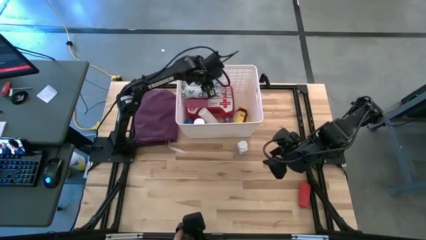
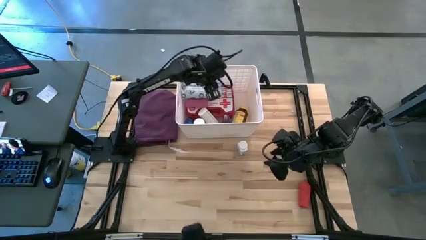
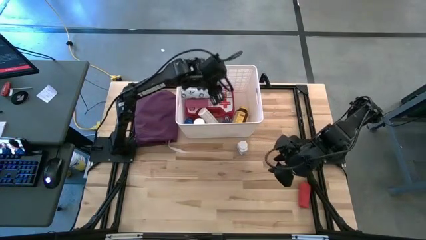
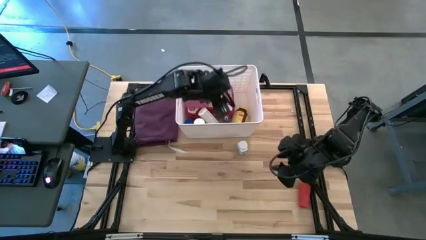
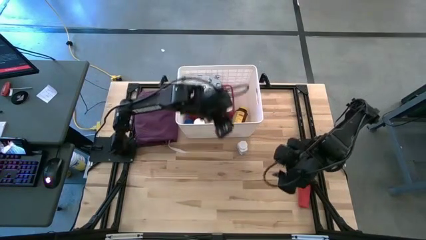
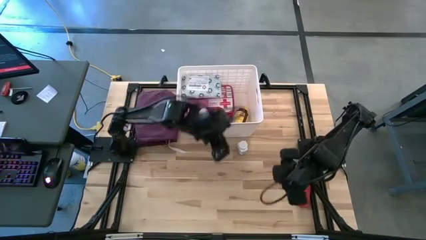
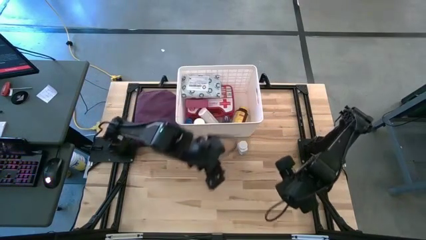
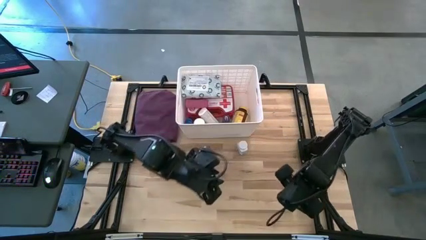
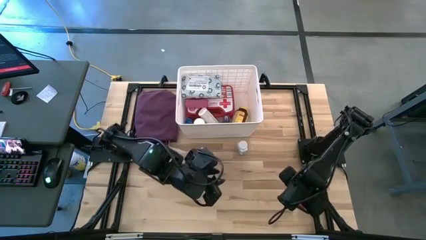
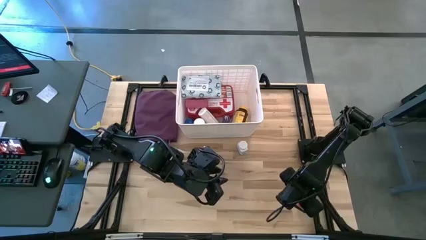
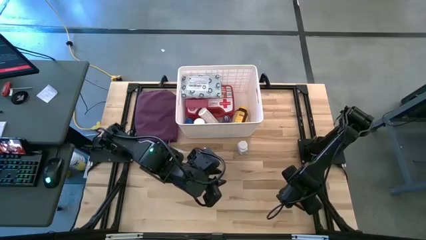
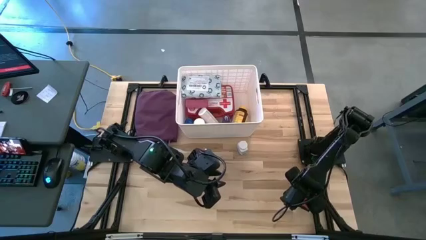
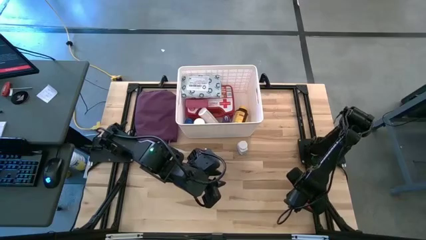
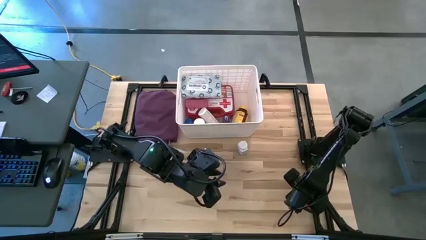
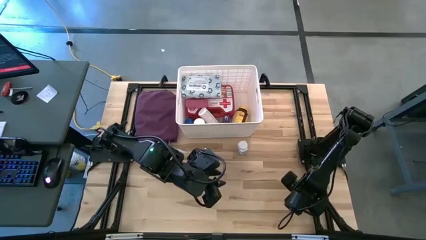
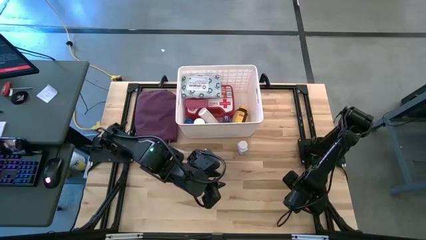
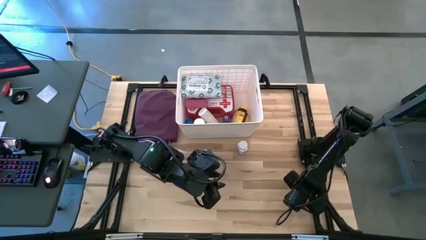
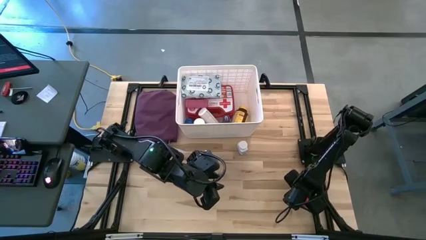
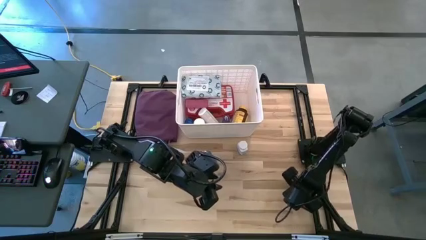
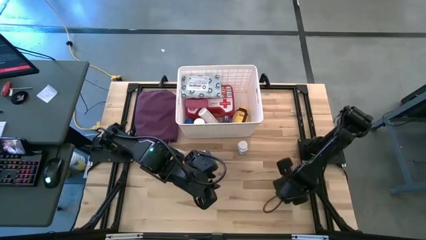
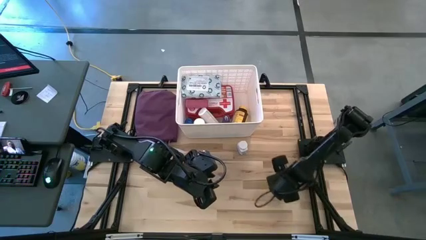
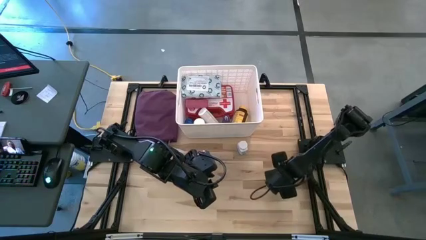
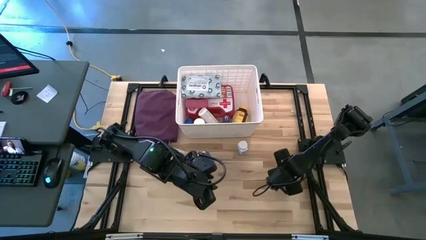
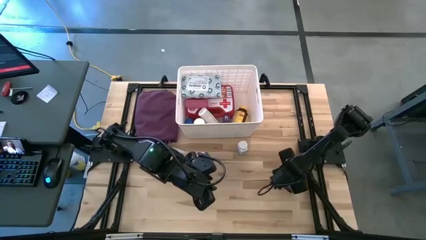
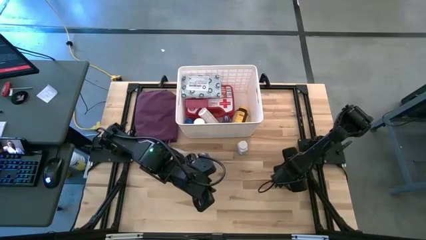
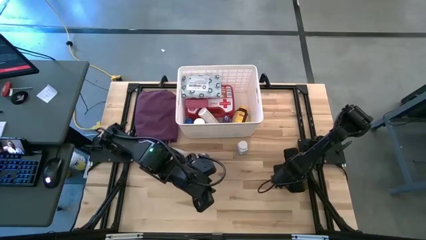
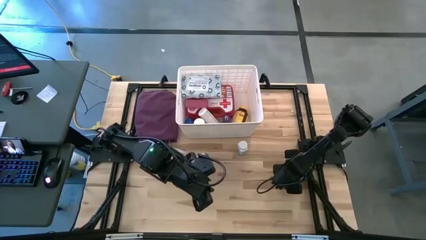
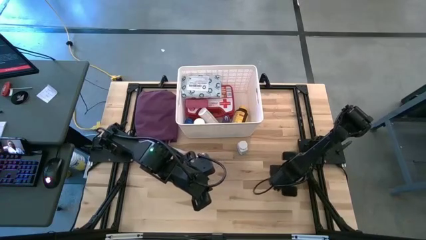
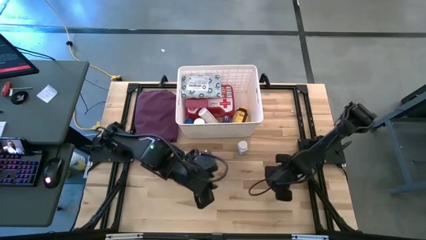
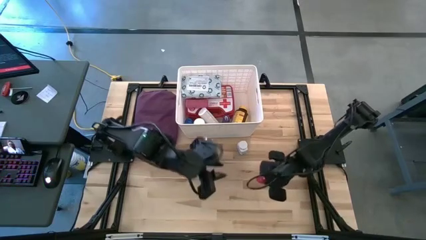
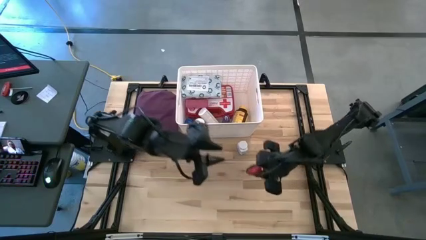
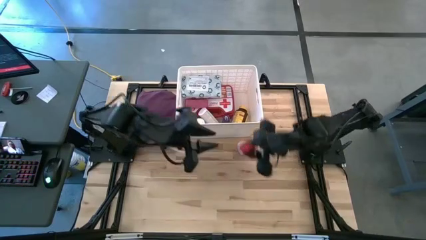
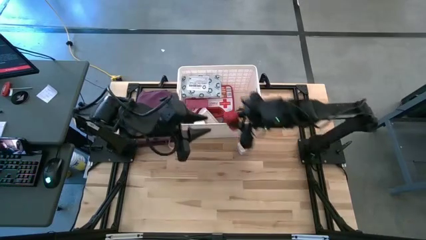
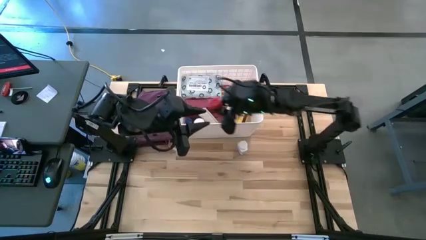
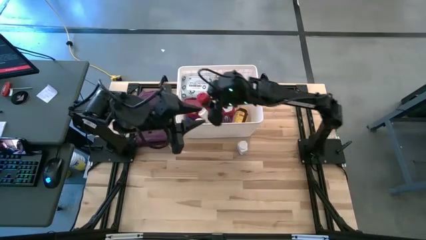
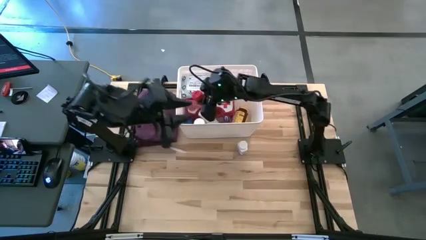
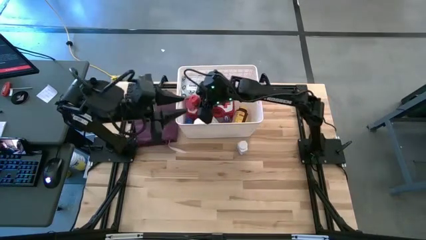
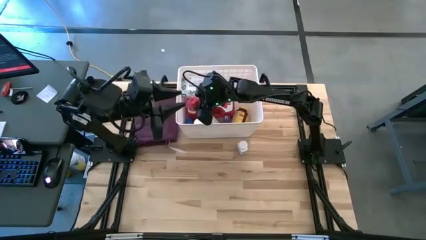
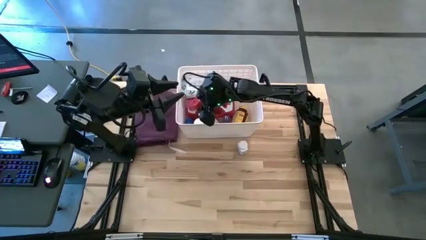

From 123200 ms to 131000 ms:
Task: Pick & place medical supplies in basket/bin
Put the red rolled bandage into the white bin

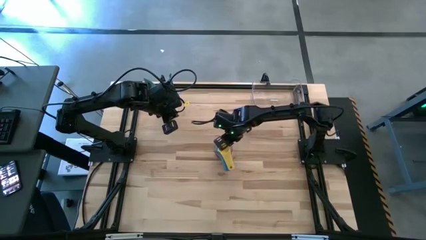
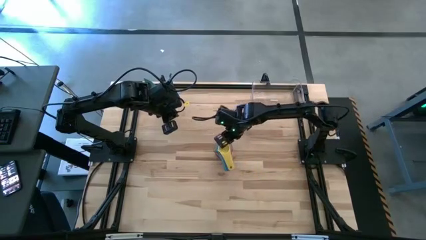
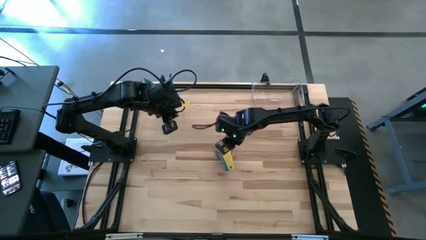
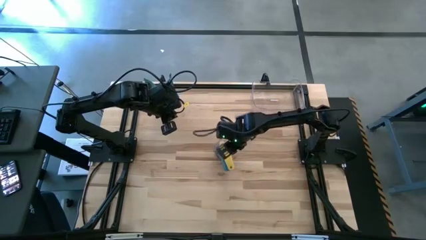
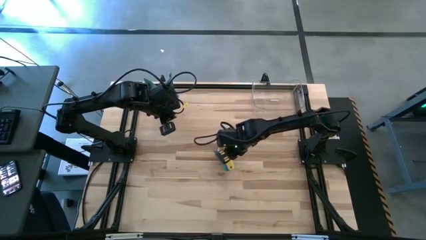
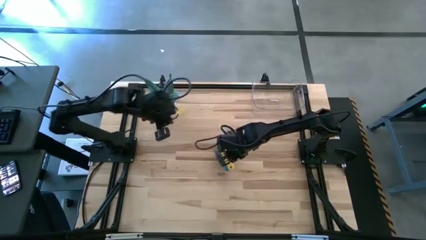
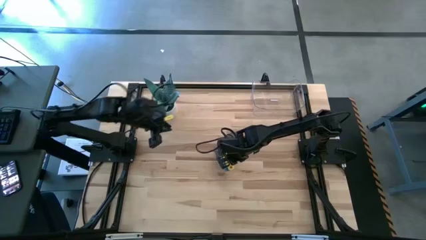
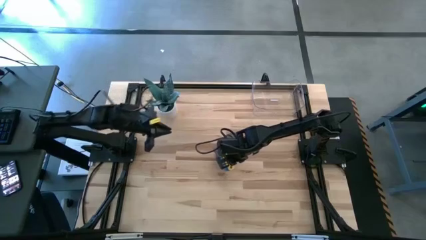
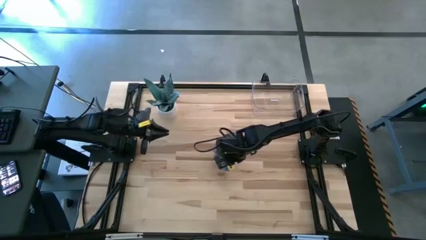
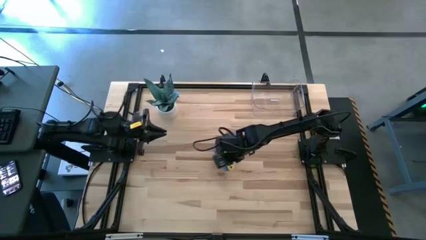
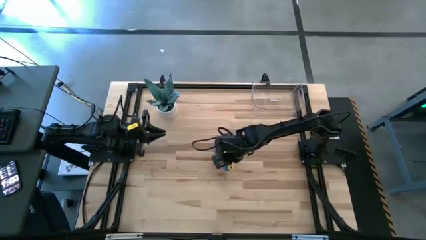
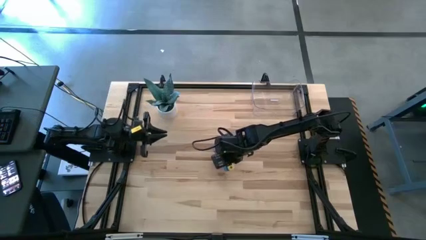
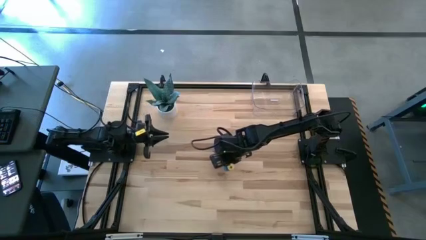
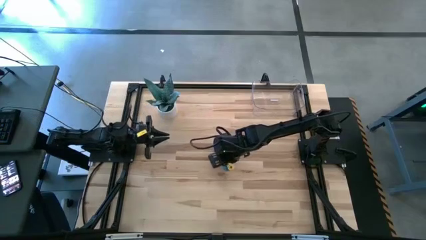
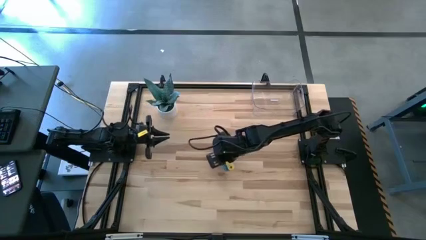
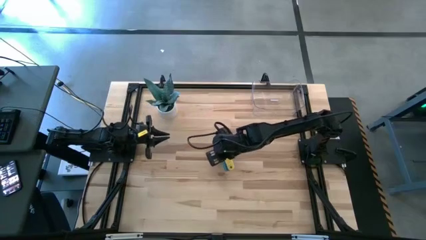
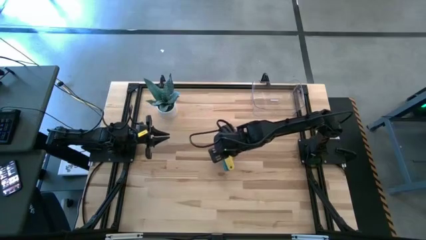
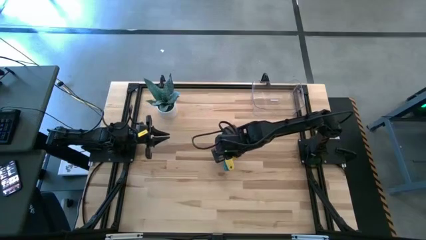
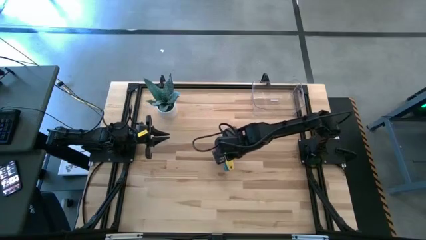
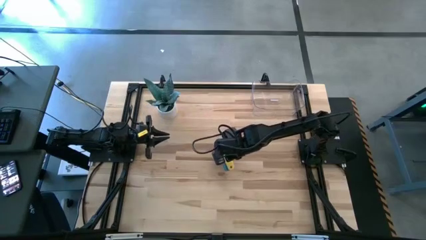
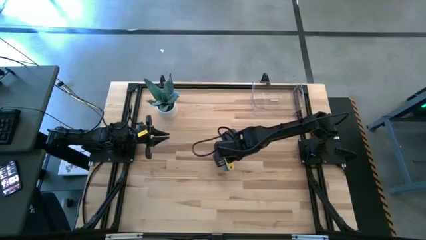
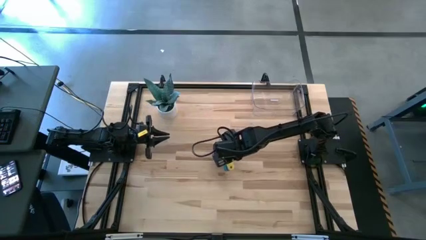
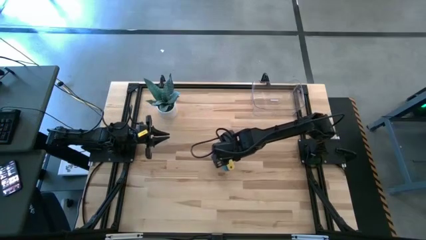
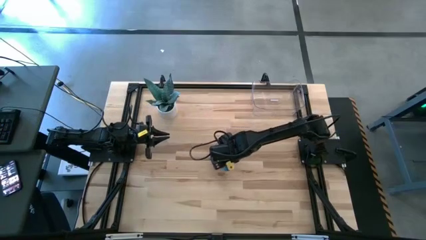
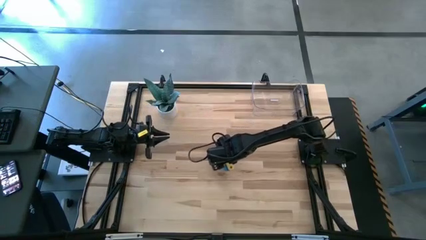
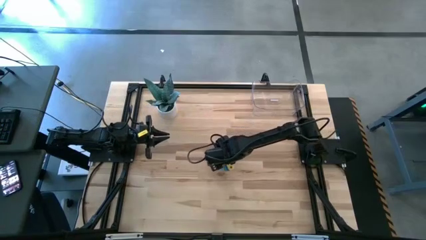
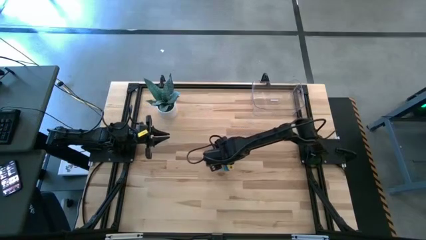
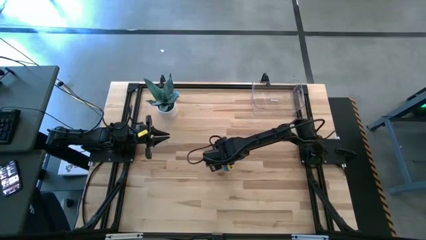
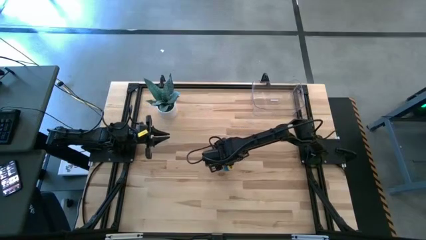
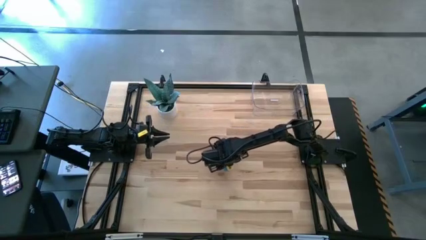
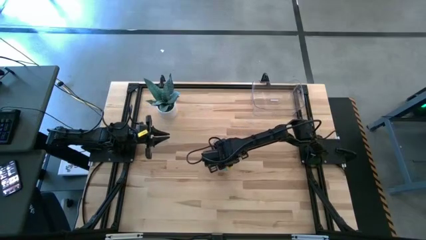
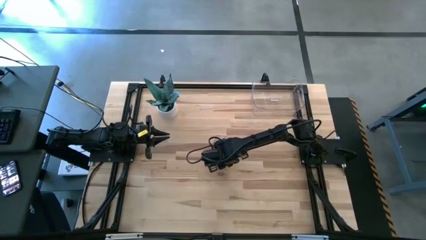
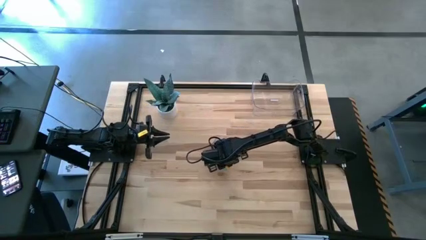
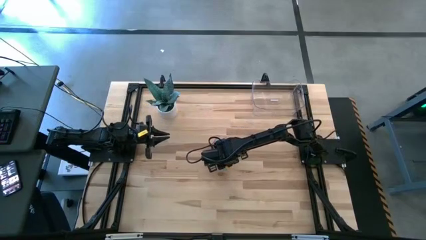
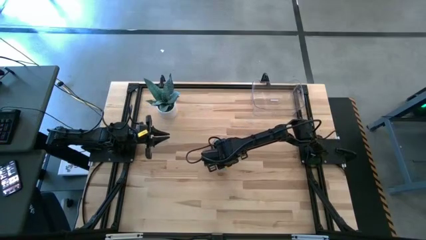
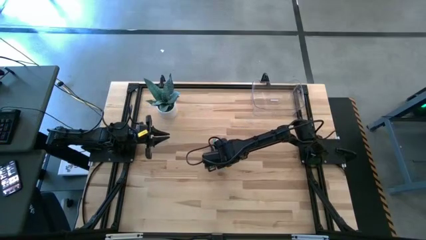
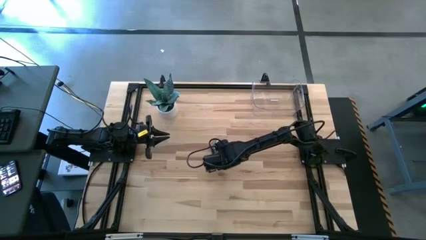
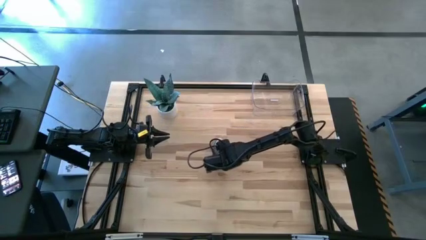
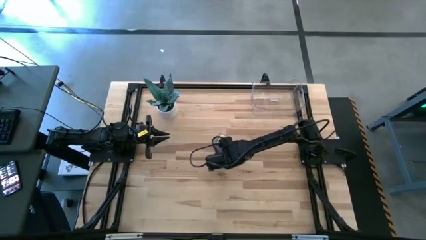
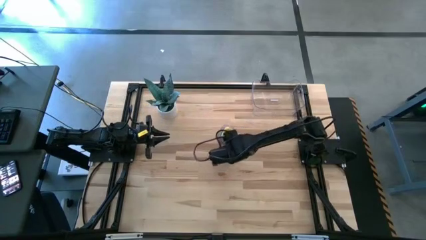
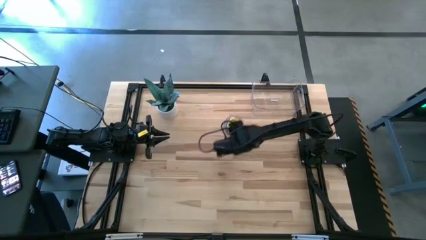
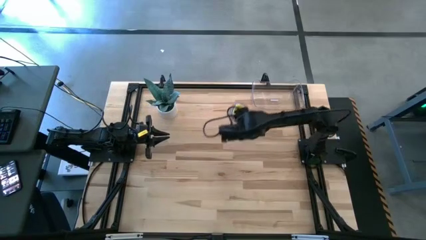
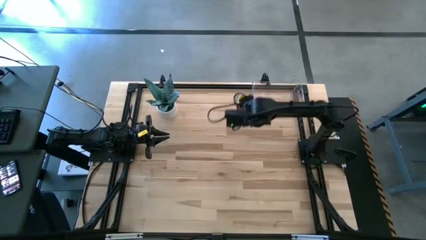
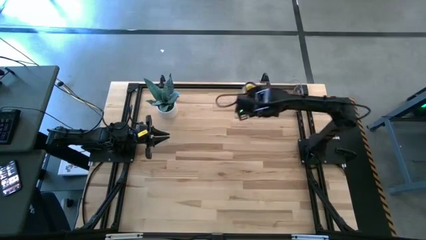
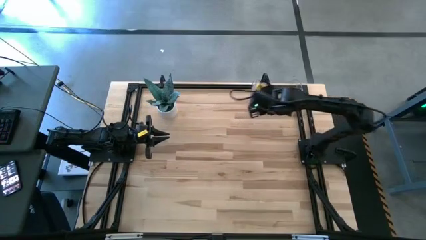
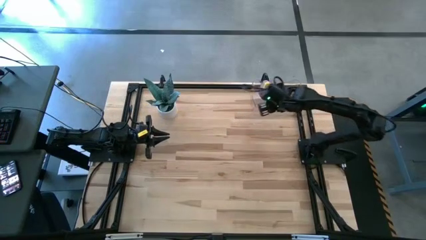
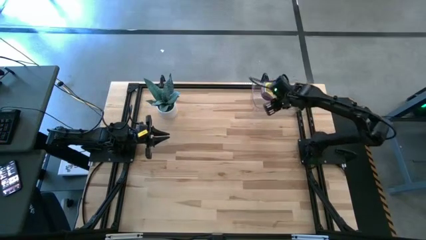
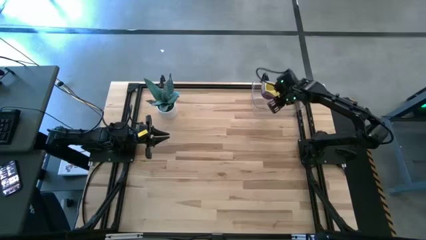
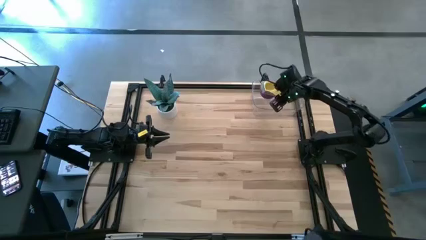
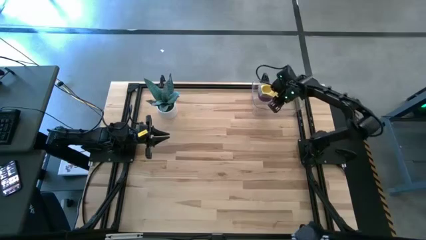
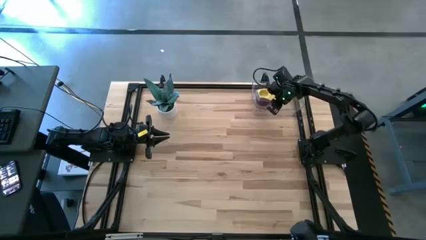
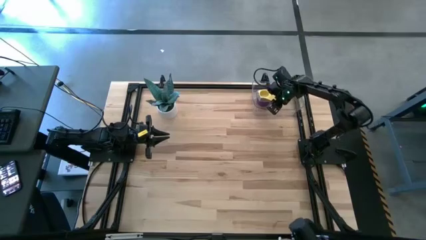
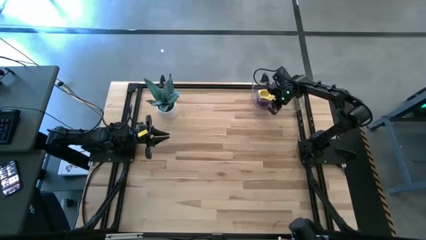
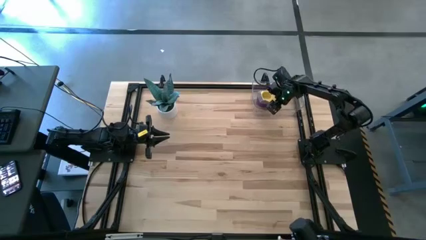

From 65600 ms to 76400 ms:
Task: Nest measuring cups in basket
Put the nested measuring cups into the transparent bin
